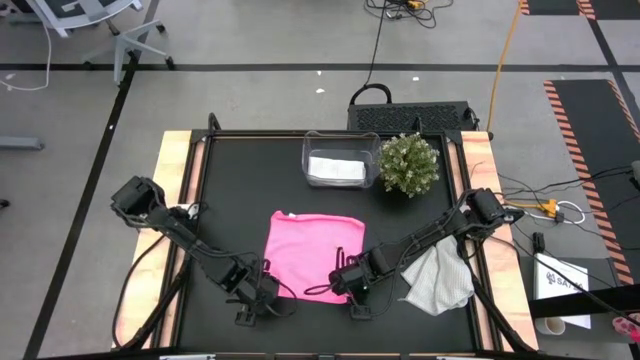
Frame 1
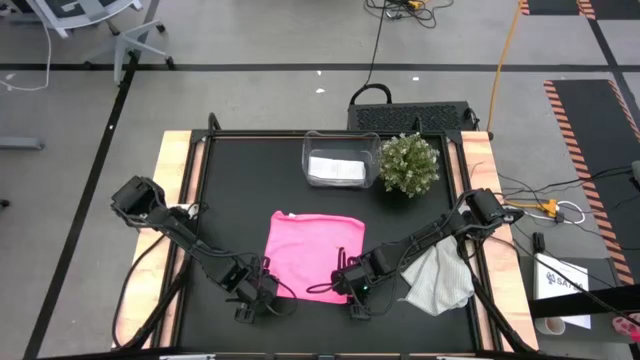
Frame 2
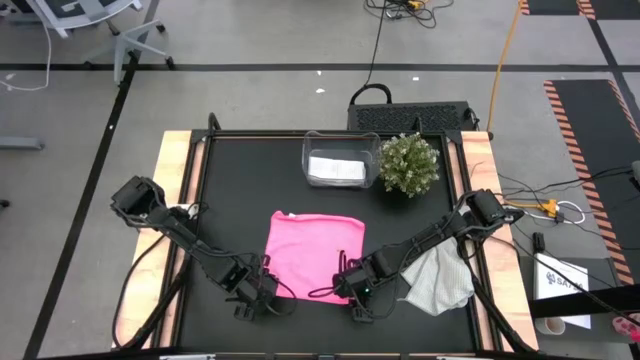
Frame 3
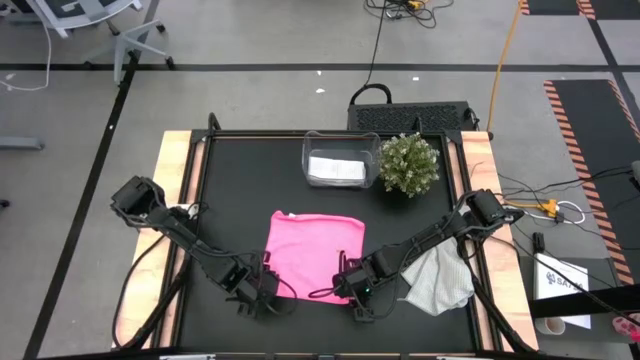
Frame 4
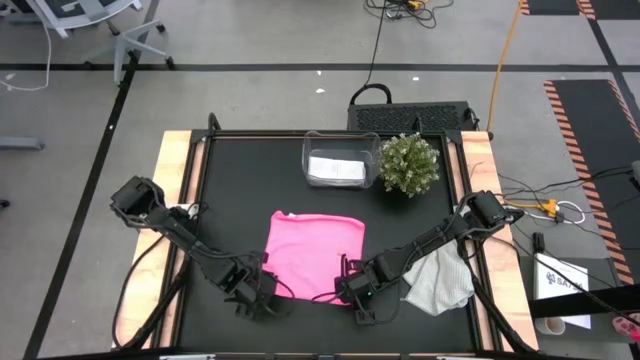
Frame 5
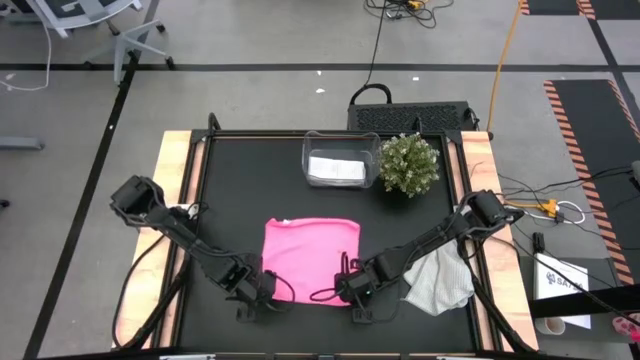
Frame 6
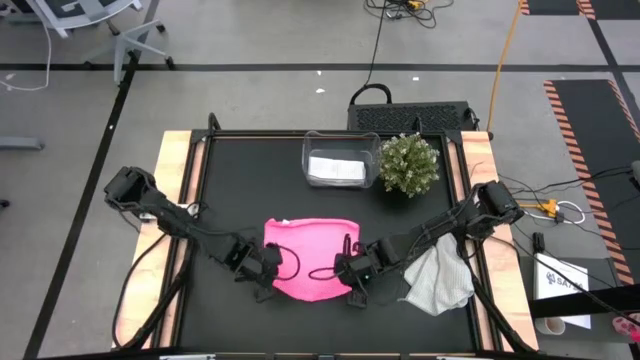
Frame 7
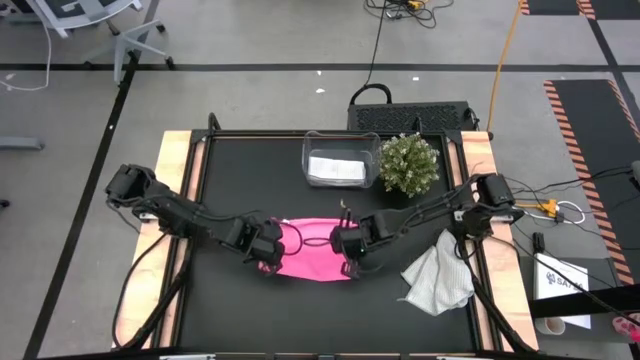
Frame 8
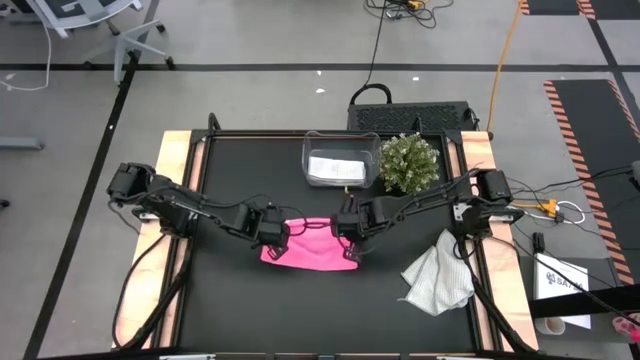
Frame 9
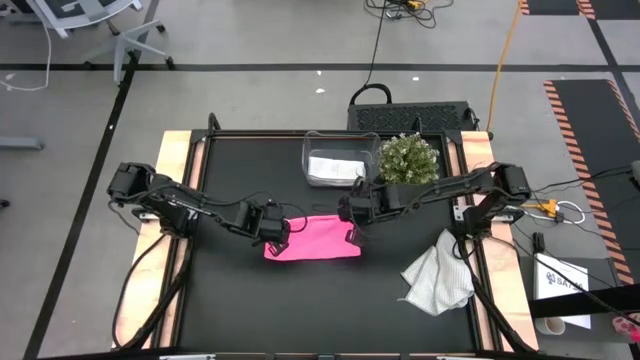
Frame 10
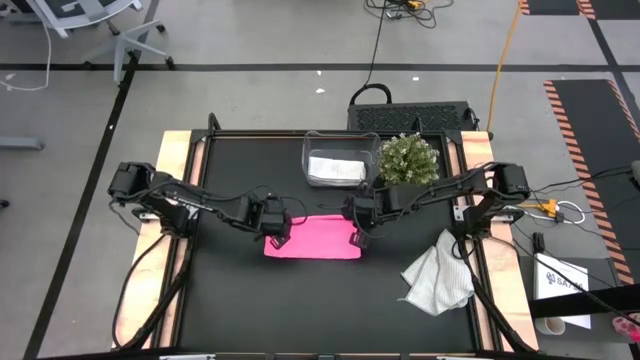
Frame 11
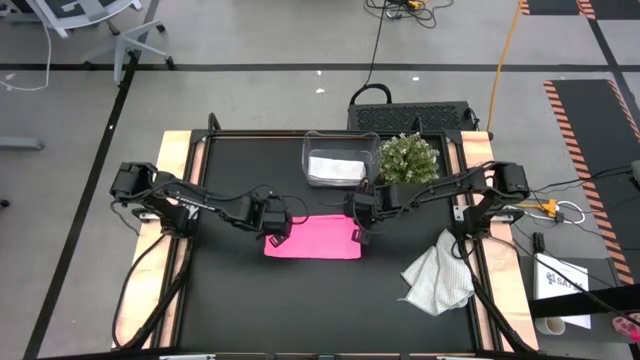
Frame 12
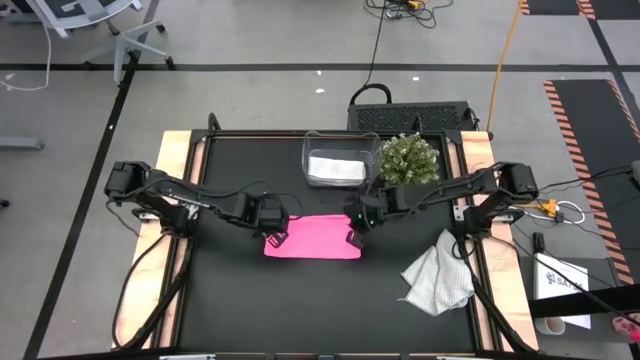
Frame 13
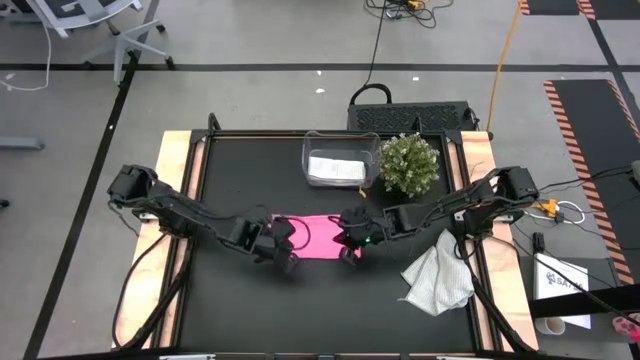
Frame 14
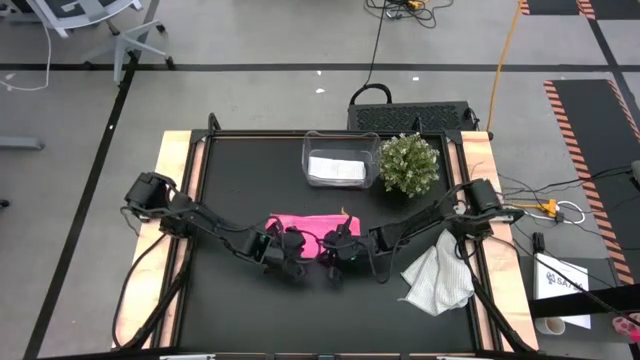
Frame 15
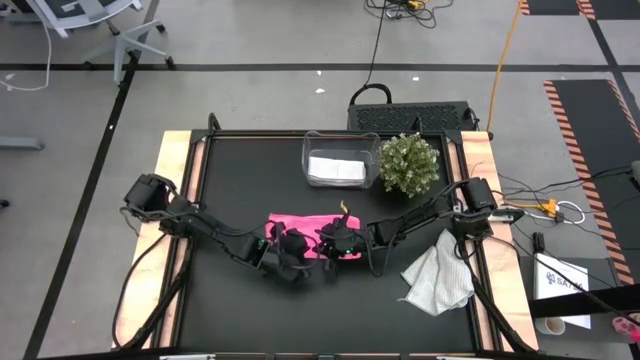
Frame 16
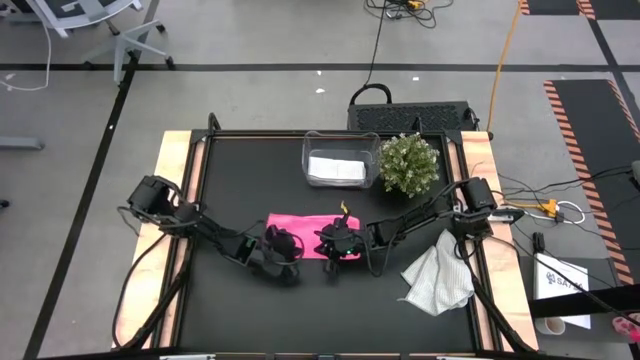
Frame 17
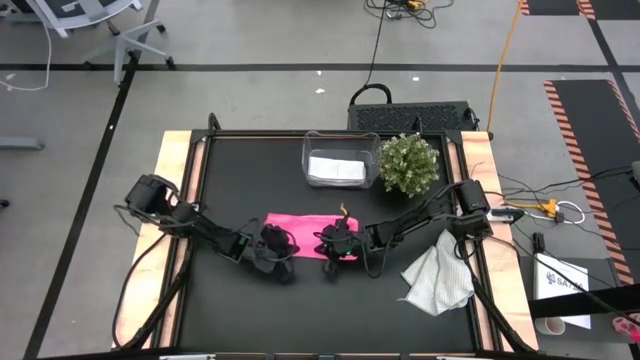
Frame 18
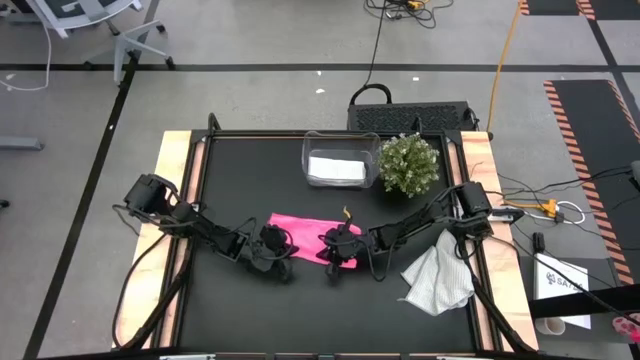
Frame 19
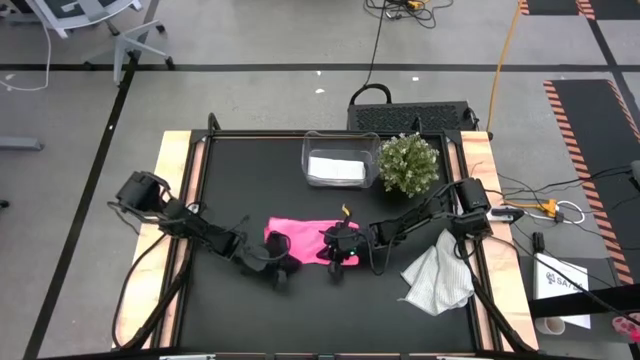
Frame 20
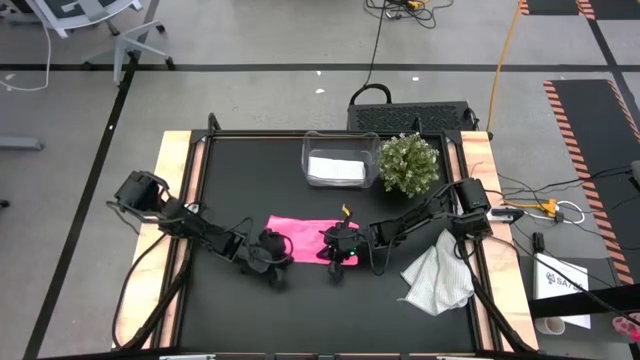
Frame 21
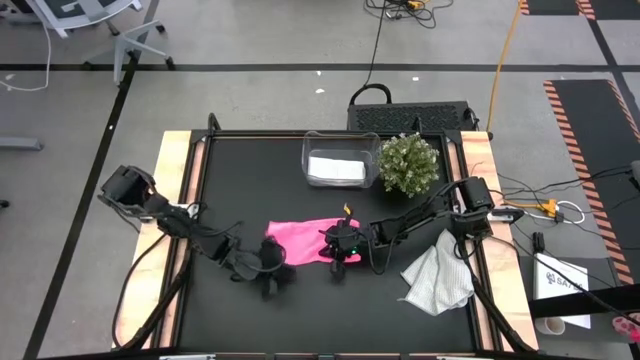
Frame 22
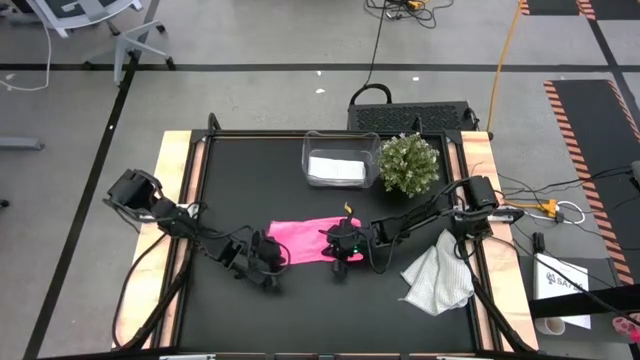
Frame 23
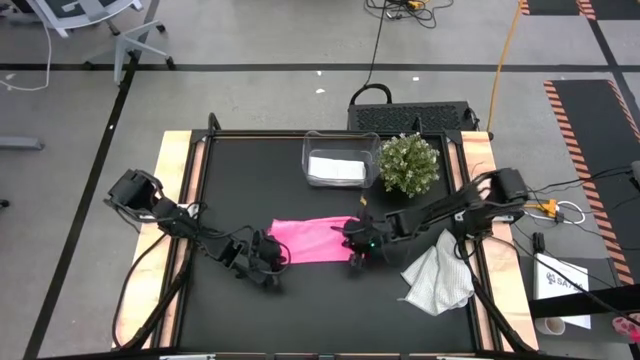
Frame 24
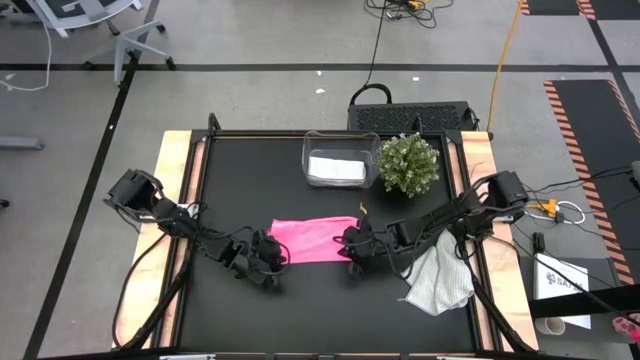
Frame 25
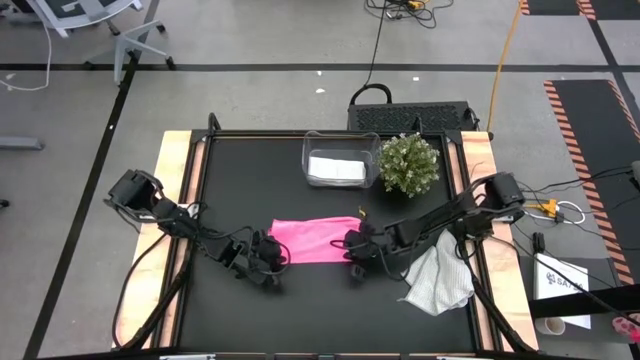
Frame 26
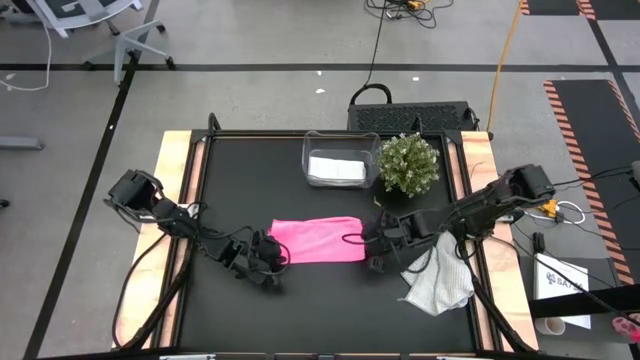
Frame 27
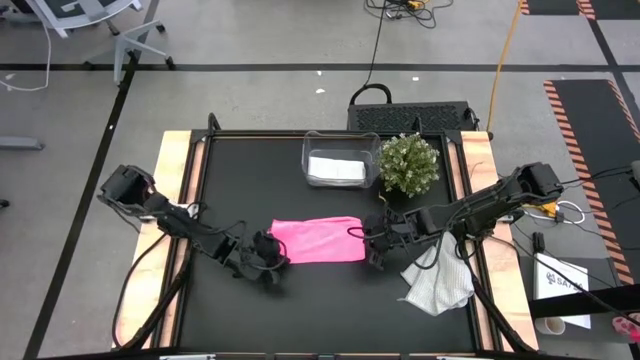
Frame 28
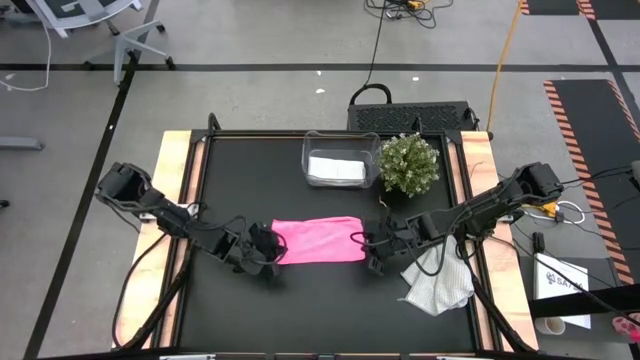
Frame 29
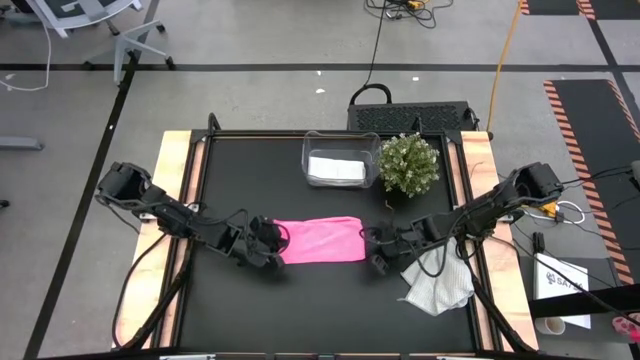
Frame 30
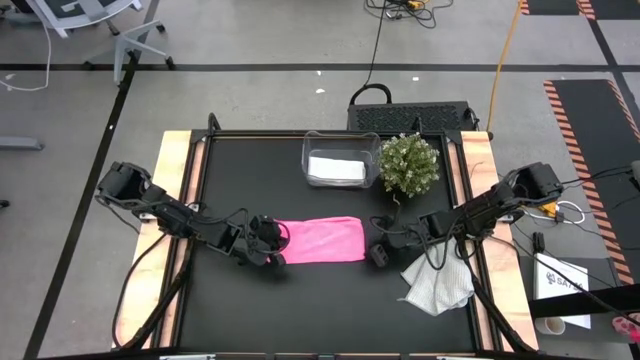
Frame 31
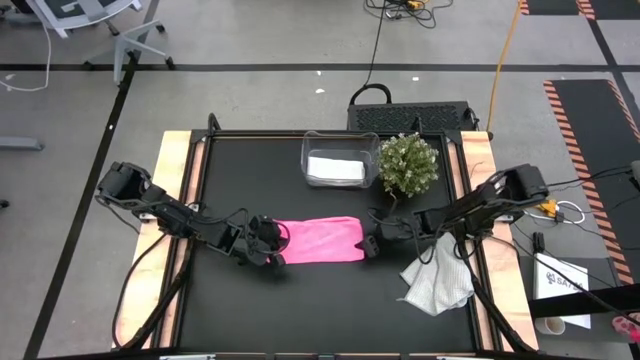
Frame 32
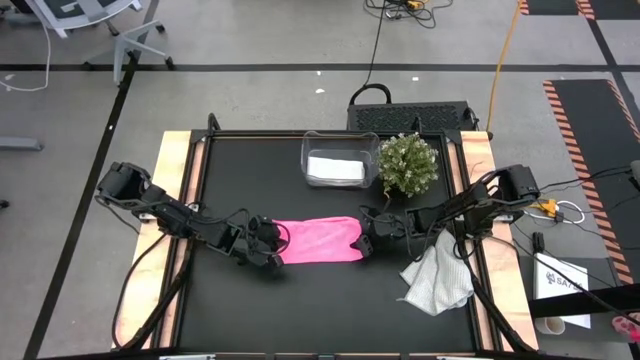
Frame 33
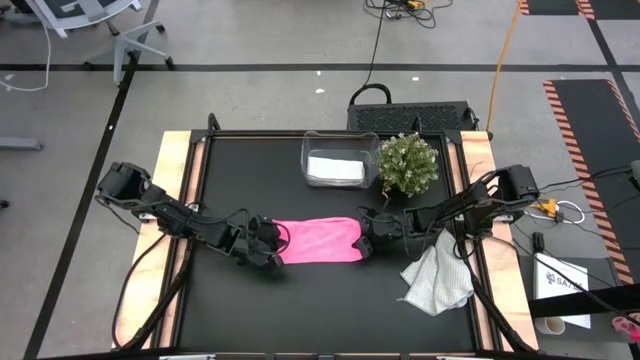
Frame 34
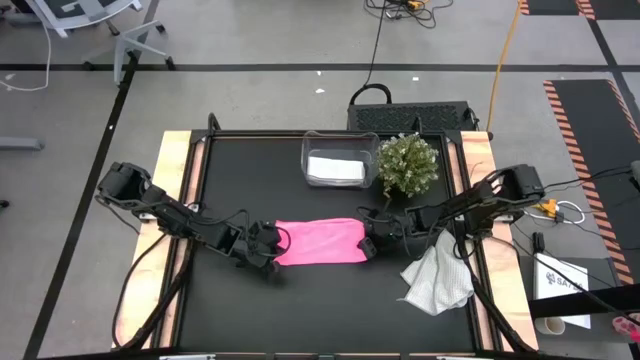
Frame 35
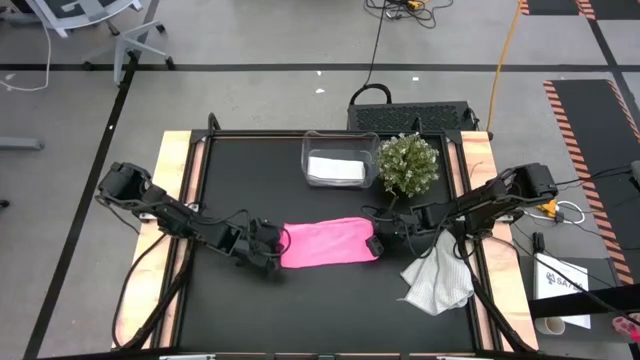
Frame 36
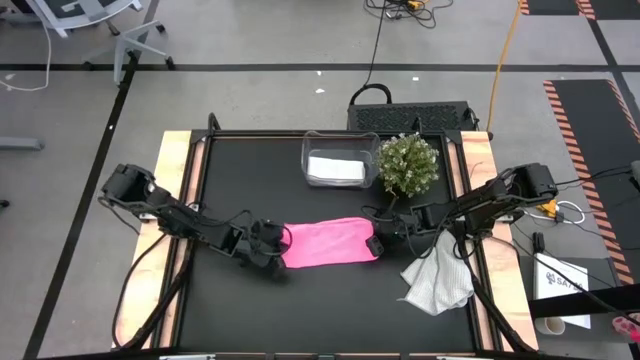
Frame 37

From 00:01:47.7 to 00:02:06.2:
Task: Fold microfiber towels
Fold the pink towel

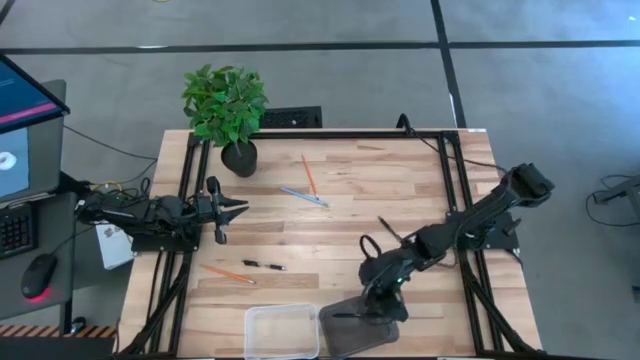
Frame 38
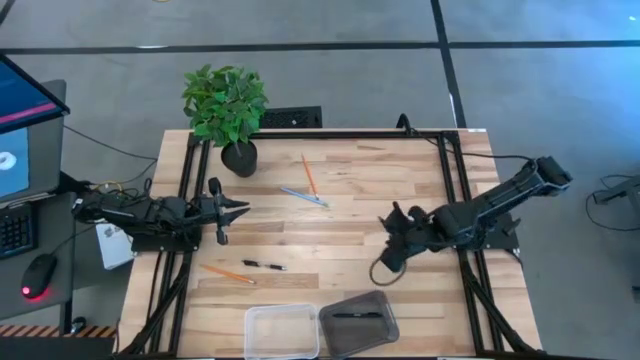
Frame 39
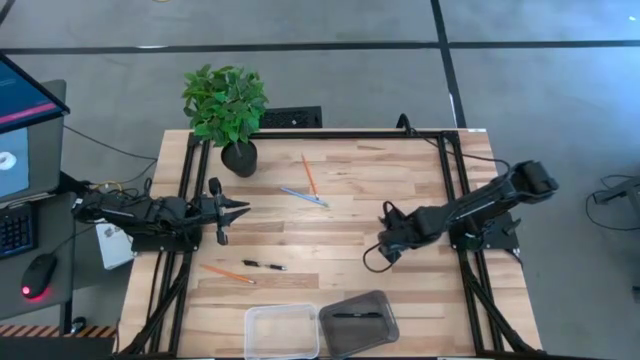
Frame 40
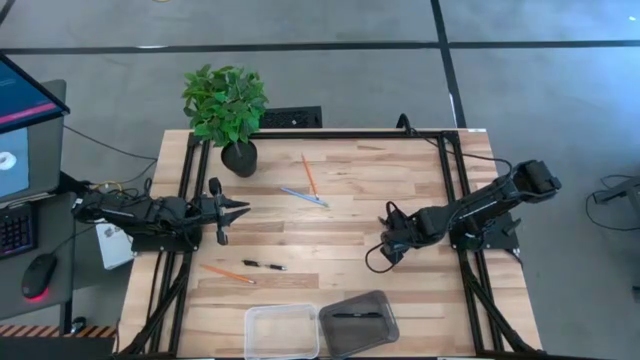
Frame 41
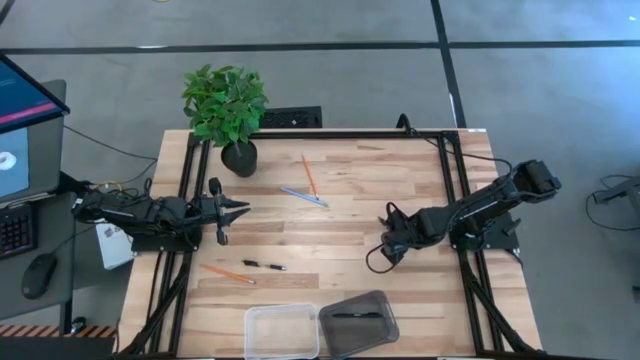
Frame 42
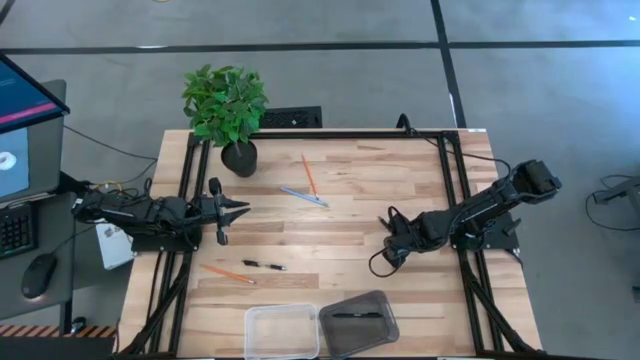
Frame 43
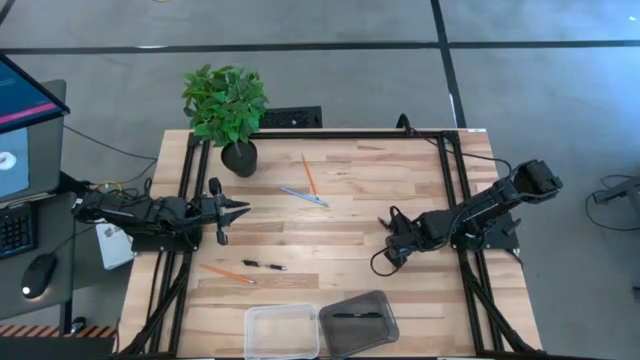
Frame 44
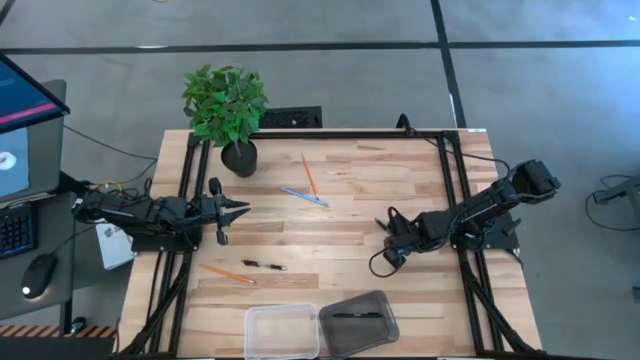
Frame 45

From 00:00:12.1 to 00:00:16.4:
Task: Sort pens & pencils
Put the right black pen into the black bin
